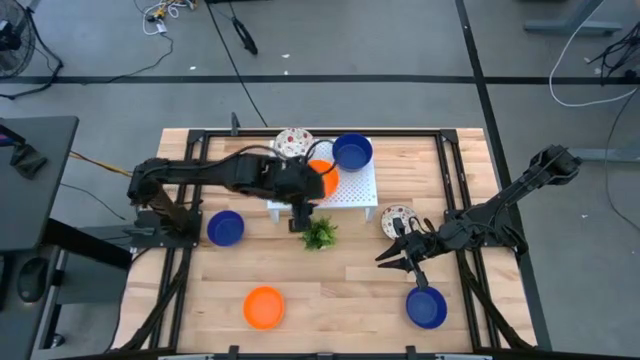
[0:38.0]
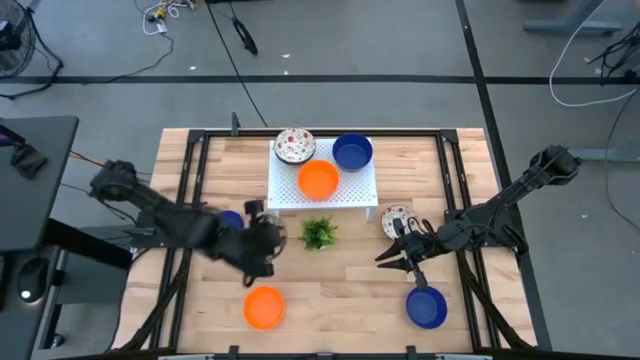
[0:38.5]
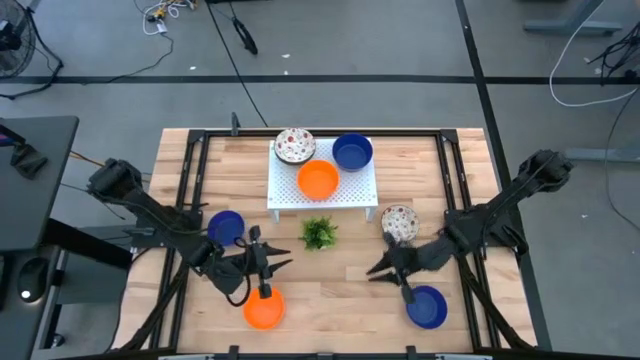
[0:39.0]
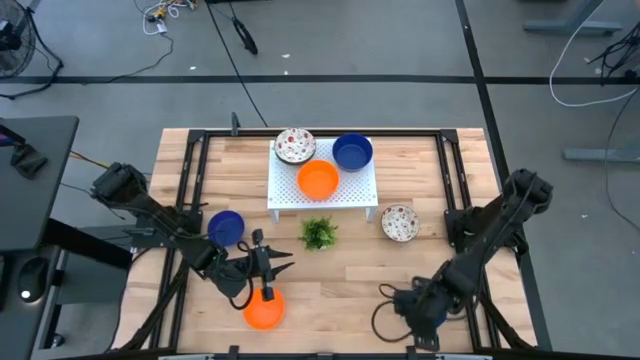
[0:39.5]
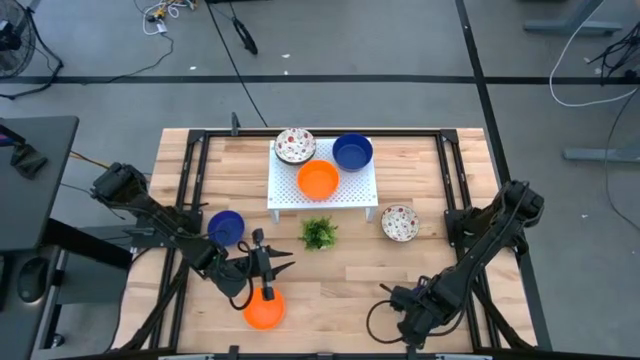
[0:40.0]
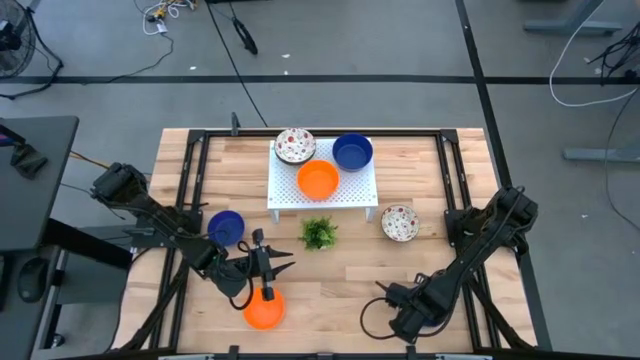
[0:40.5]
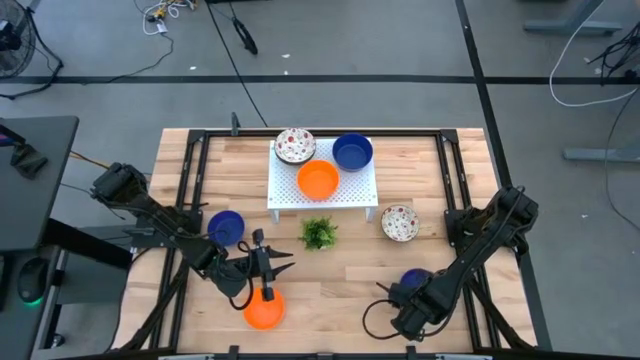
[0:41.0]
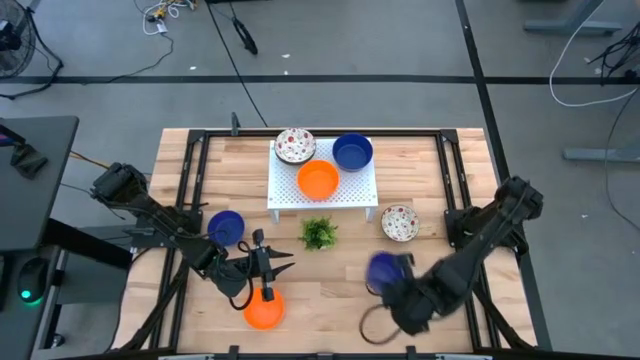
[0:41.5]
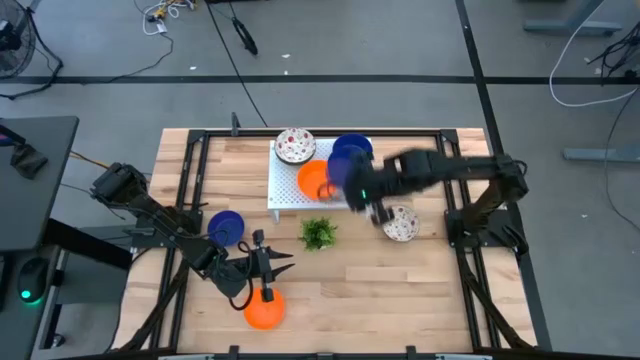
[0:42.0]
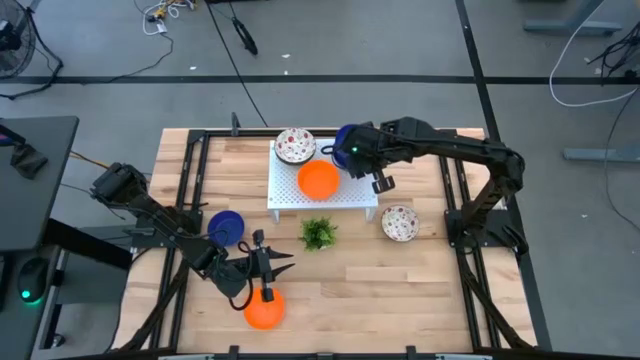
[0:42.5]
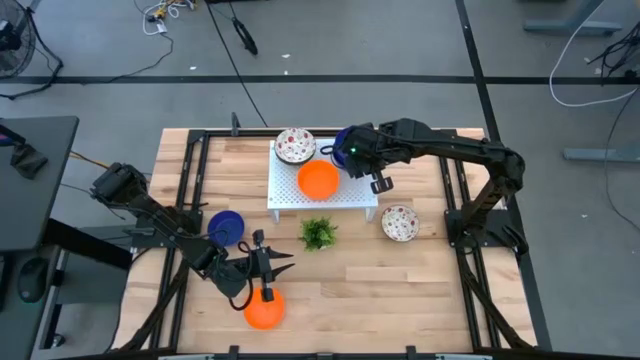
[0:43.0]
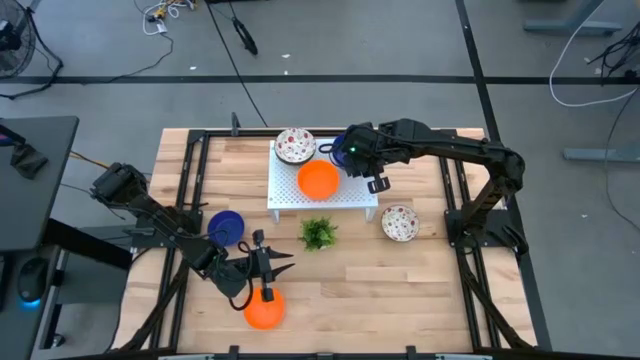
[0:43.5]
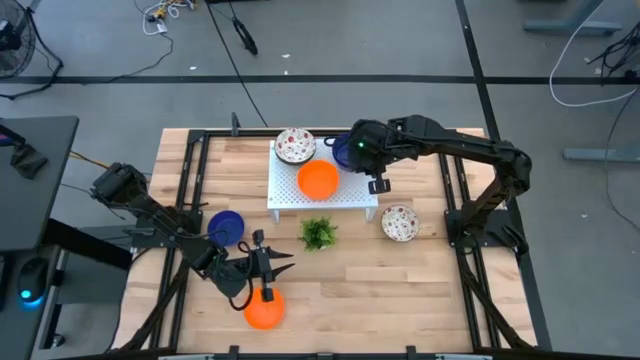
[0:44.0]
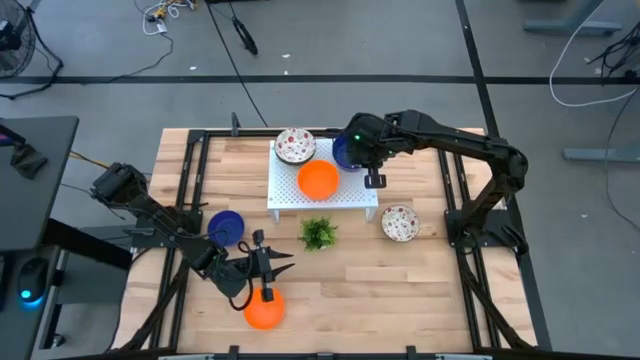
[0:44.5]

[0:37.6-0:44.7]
Task: Pick & Place Mini bowls
Stack the blue bowl on top of the blue bowl on the shelf

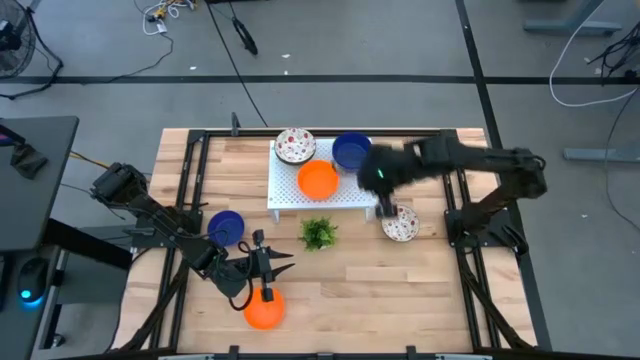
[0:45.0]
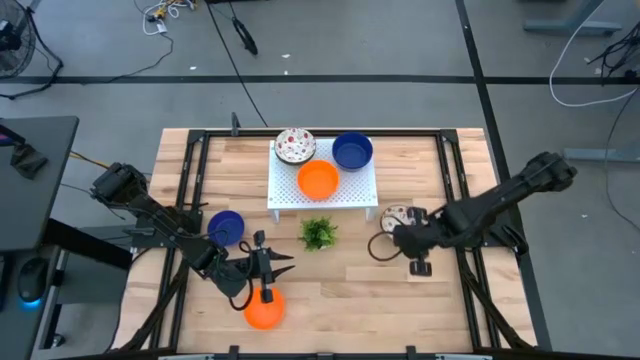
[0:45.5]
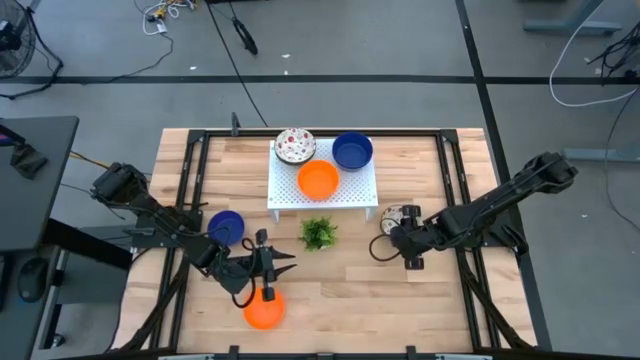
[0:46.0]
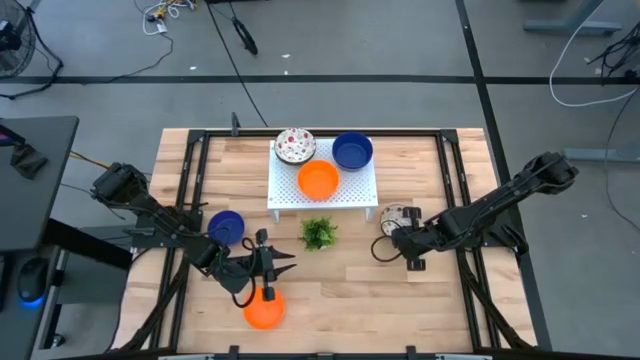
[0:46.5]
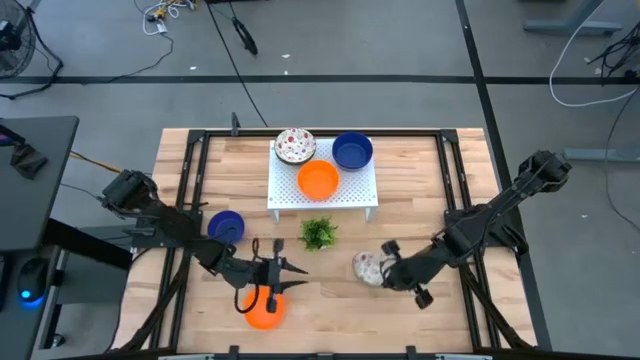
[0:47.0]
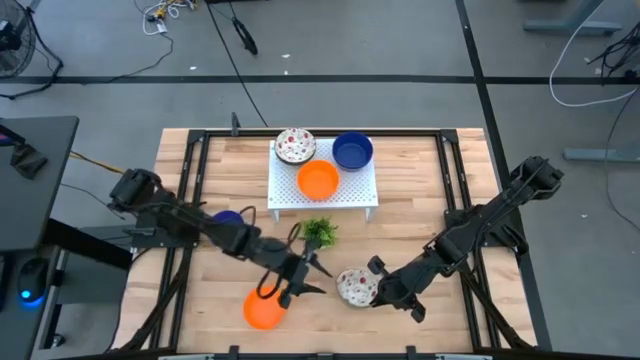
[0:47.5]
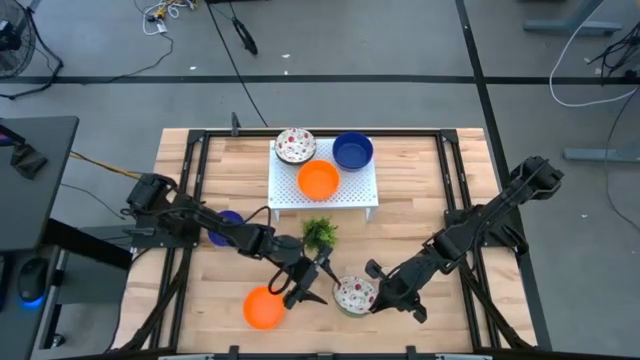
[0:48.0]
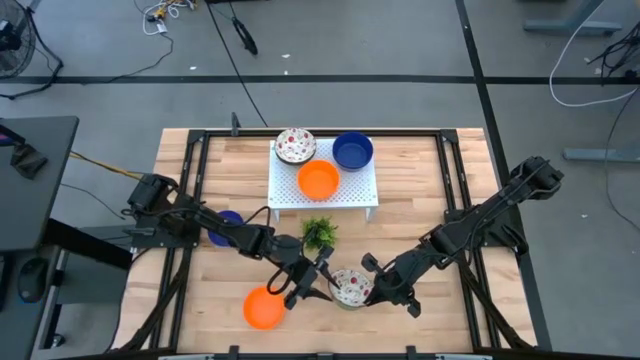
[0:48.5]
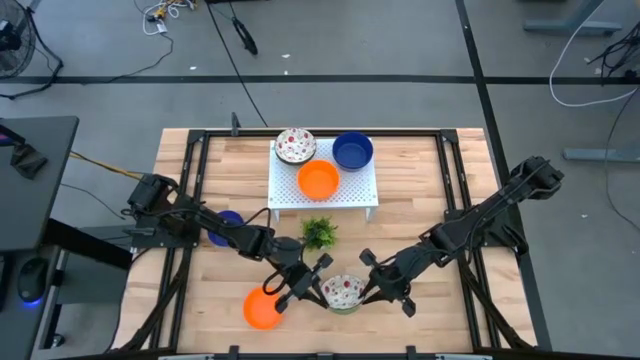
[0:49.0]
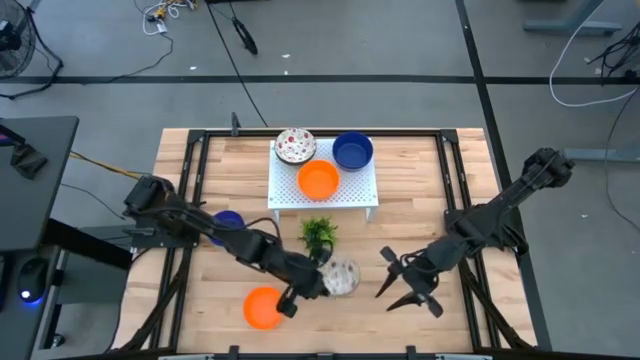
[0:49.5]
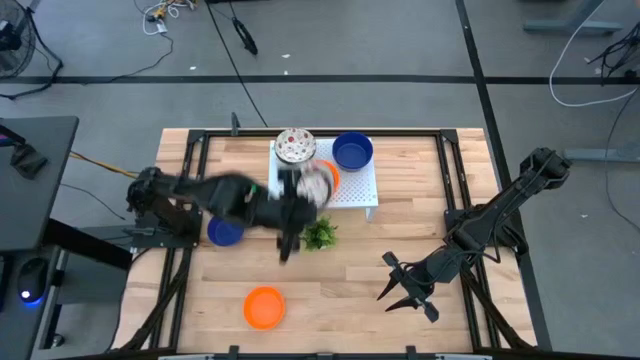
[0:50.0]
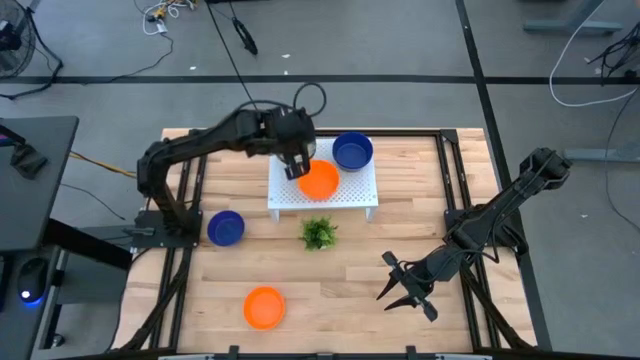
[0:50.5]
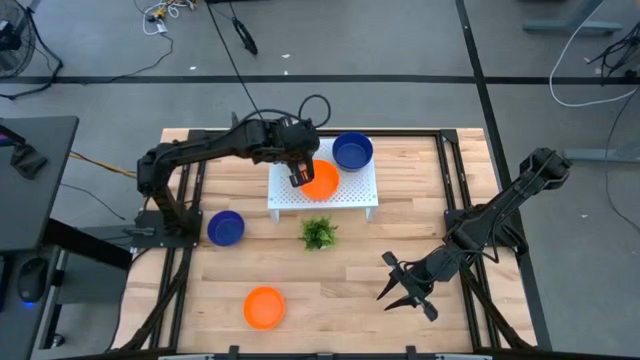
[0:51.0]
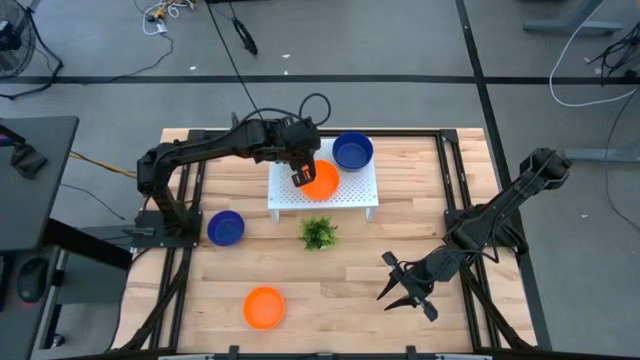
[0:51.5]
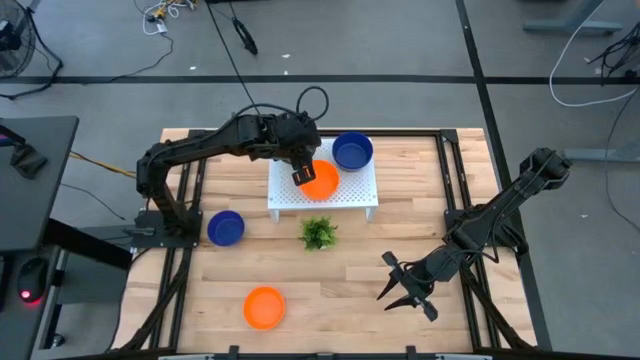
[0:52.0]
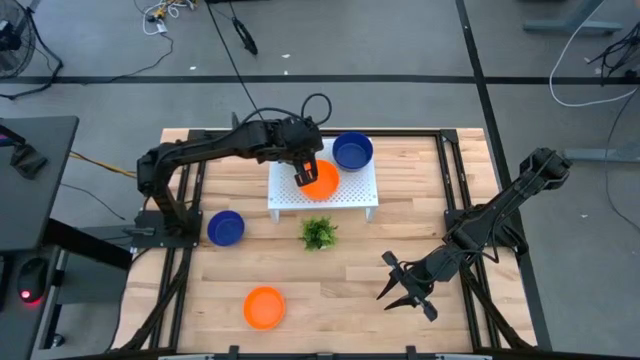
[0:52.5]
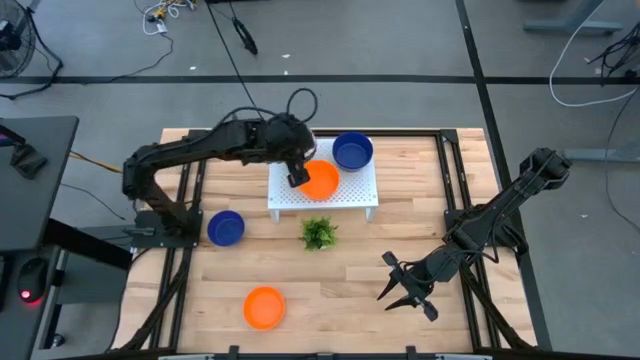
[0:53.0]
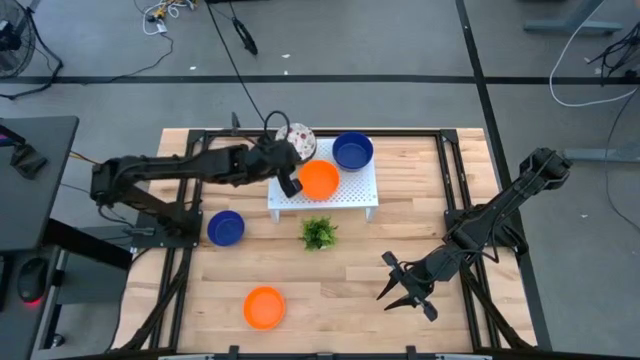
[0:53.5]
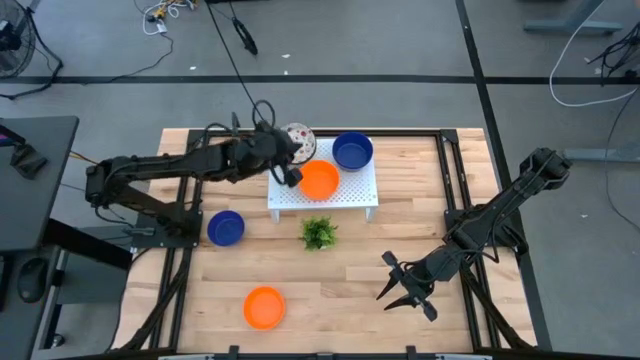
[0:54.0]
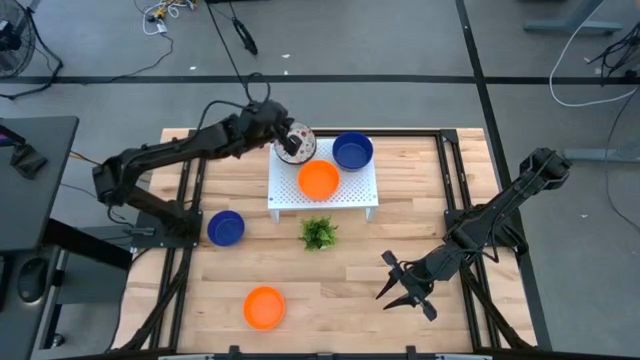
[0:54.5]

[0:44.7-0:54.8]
Stack the white bowl on top of the white bowl on the shelf

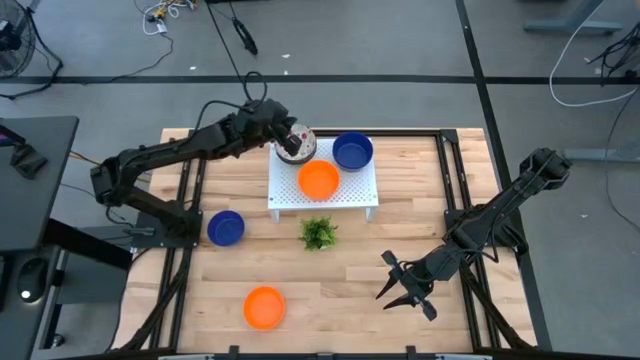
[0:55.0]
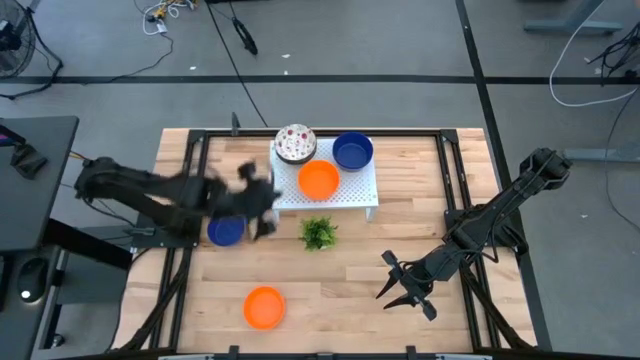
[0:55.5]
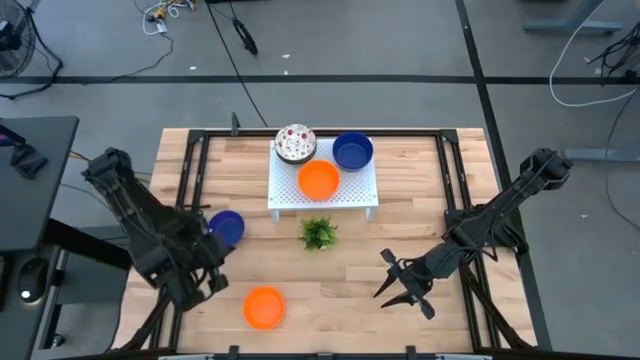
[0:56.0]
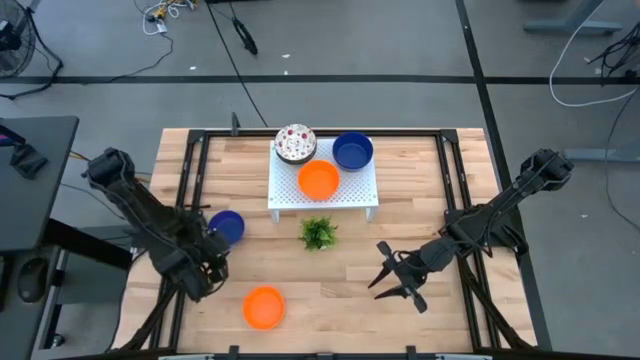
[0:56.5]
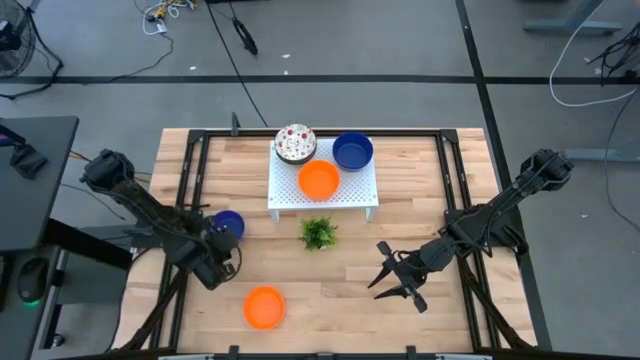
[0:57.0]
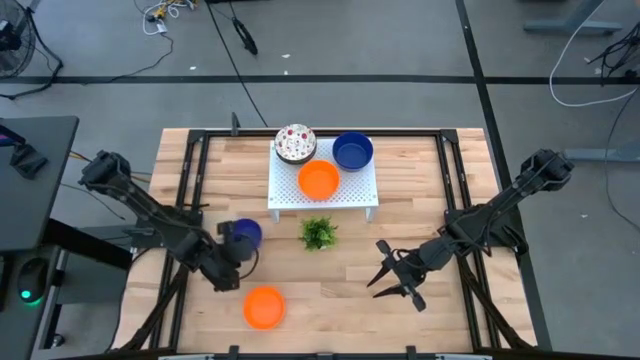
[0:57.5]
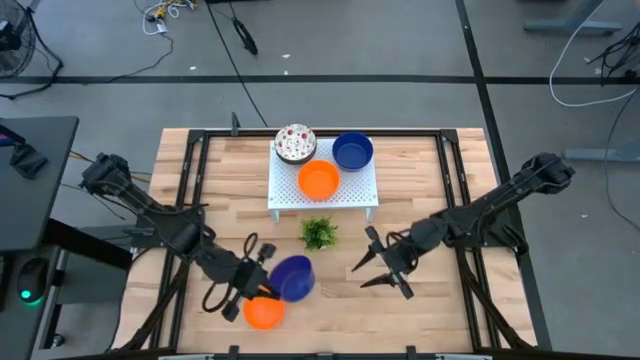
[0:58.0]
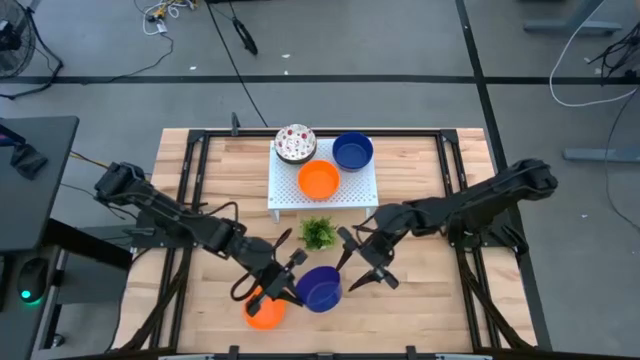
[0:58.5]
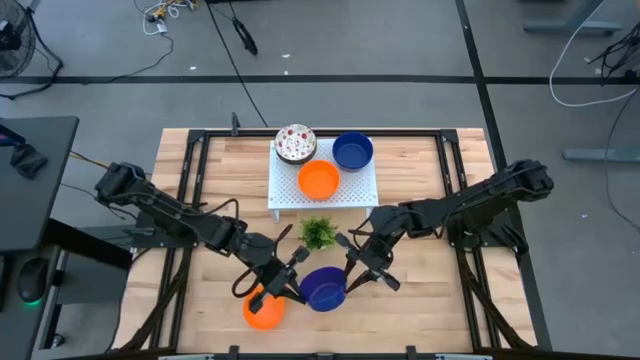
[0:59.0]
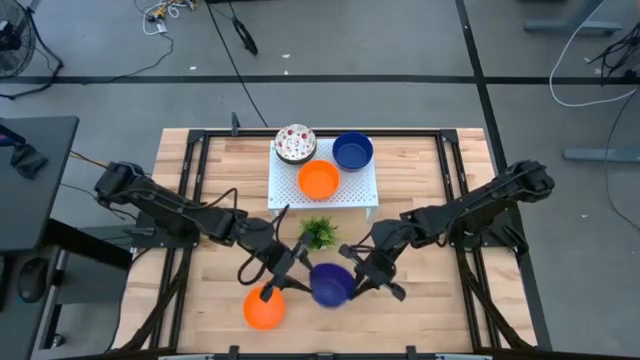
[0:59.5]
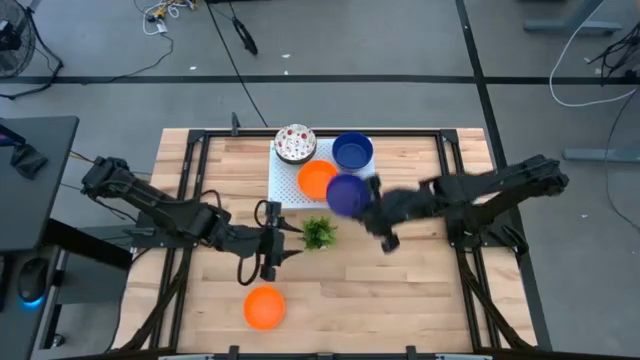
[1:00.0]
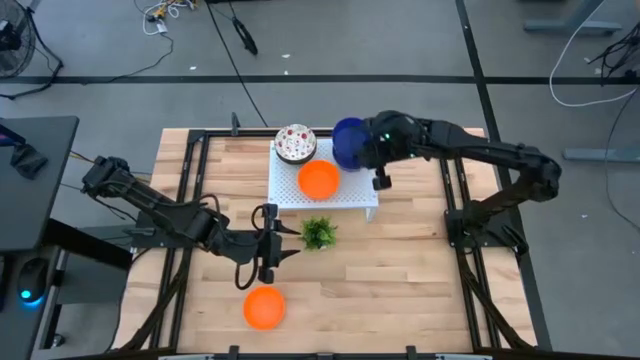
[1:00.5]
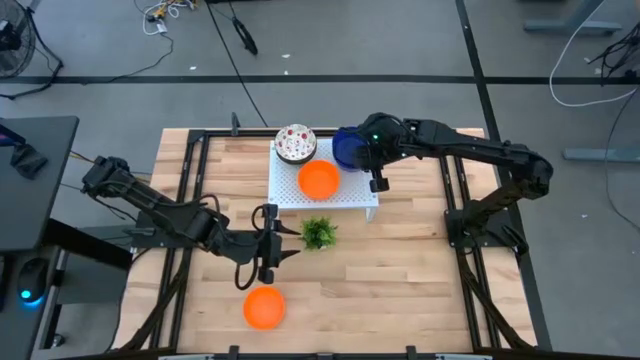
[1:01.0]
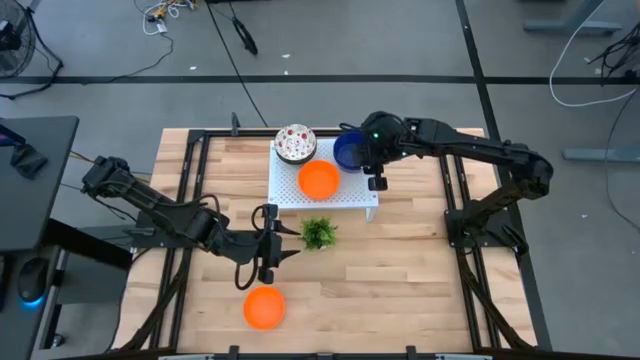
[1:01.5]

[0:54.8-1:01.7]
Stack the blue bowl on top of the blue bowl on the shelf
